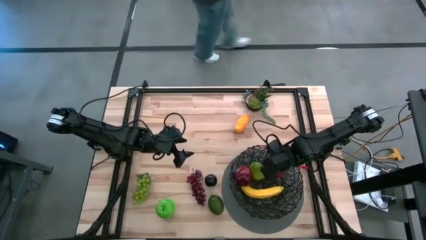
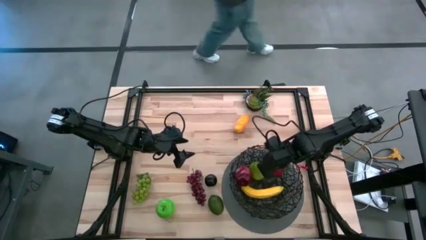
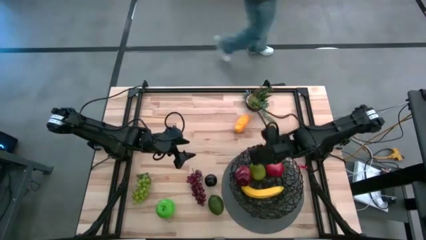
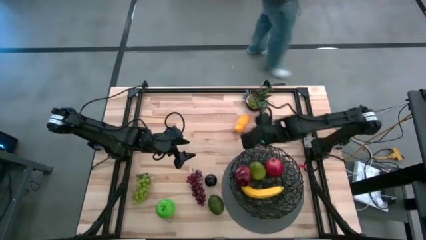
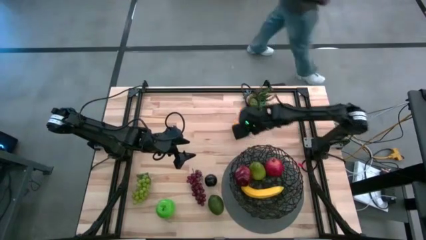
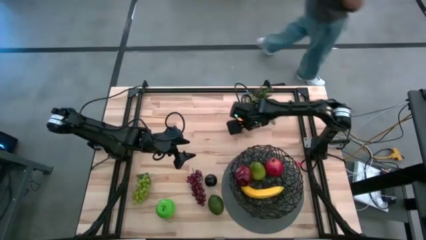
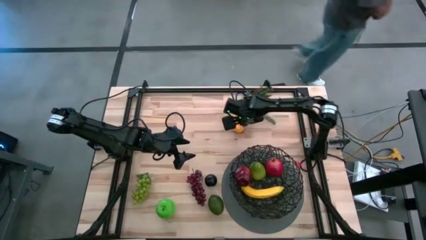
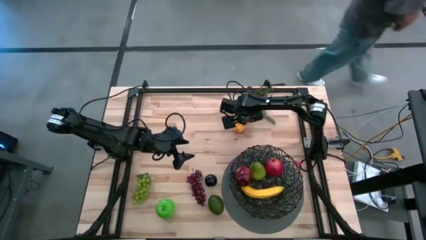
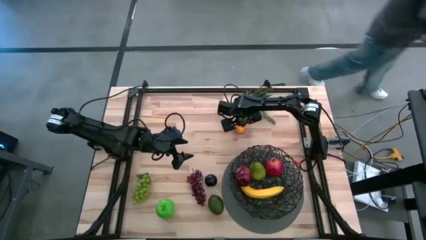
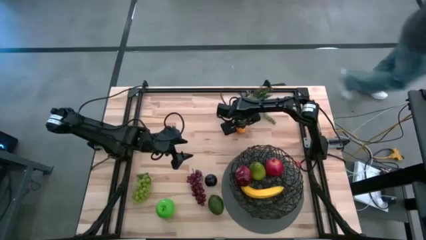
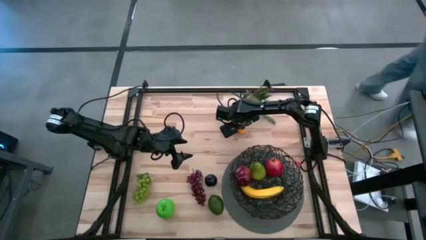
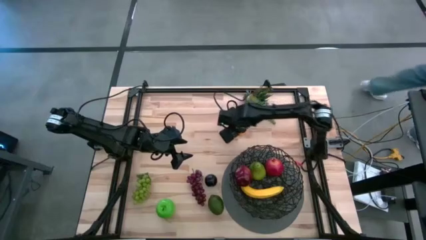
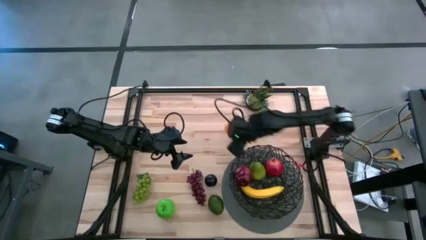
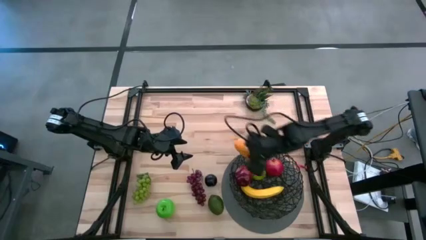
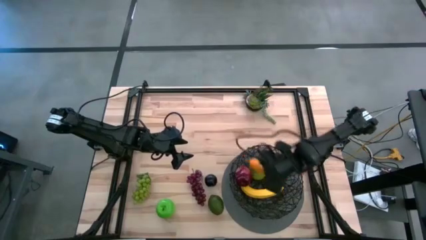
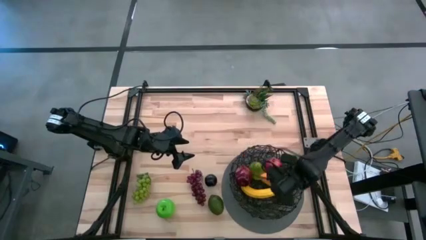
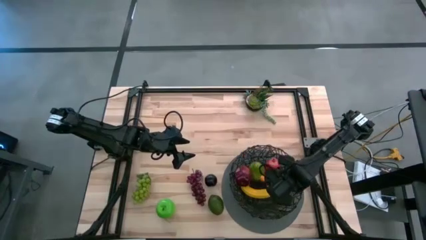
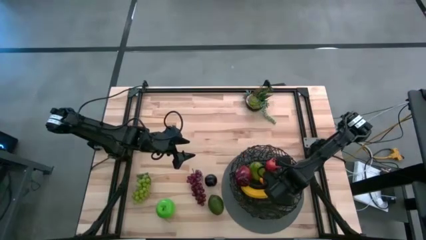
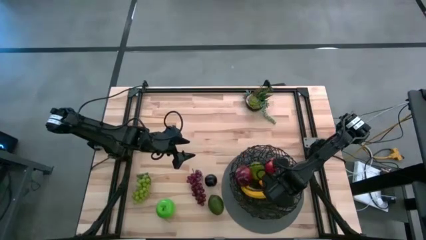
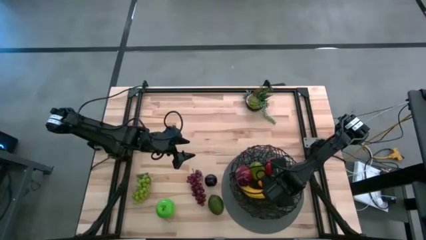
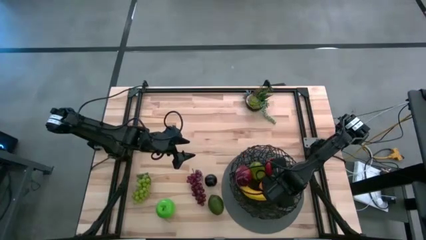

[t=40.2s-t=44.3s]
Task: Build produce basket
Put the mango into the black wire basket

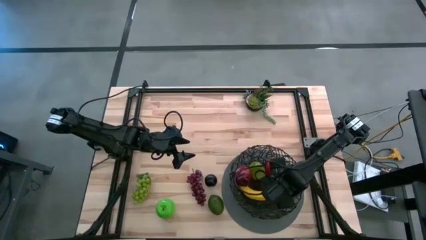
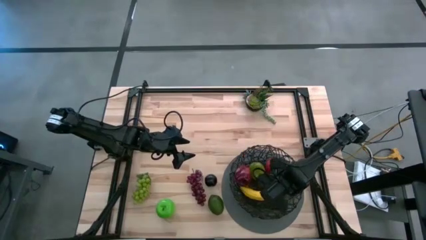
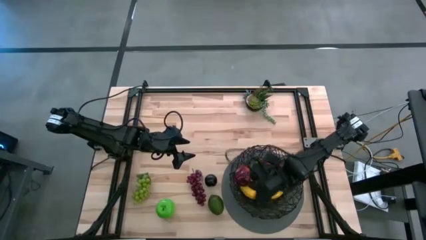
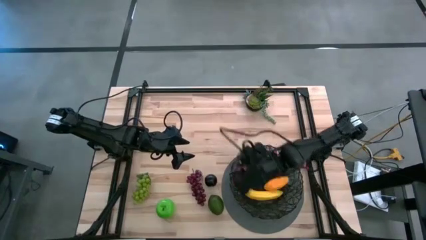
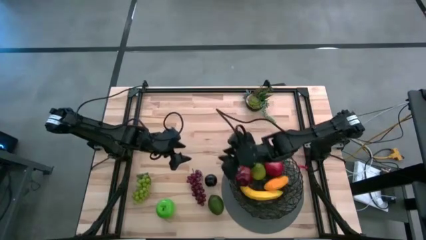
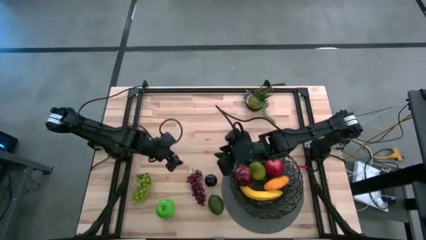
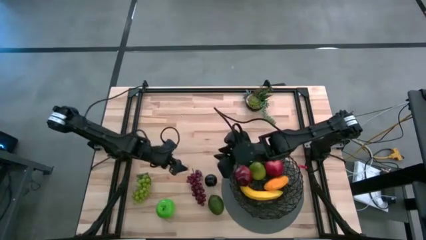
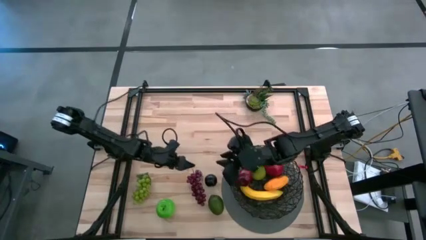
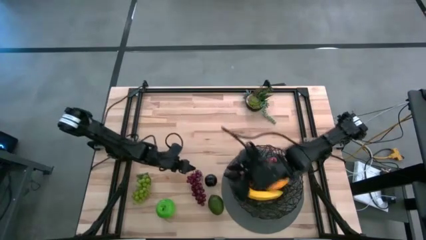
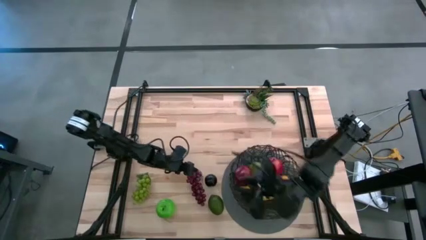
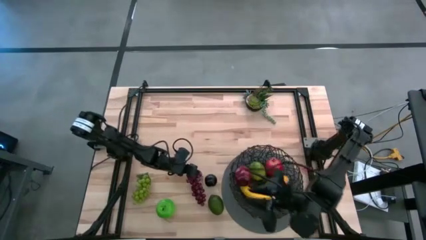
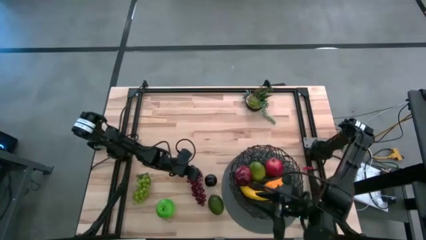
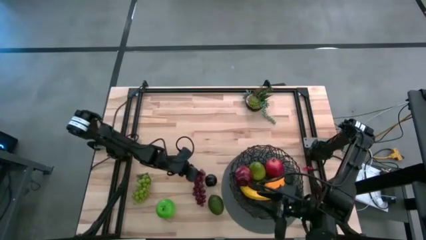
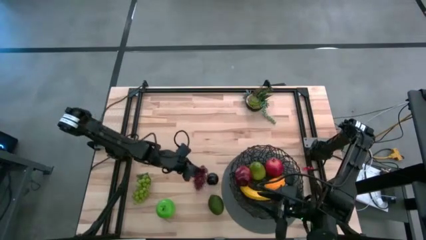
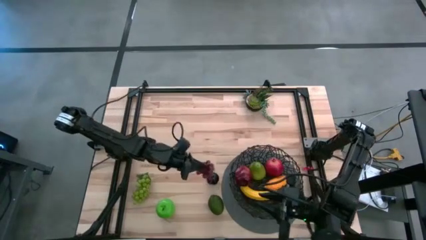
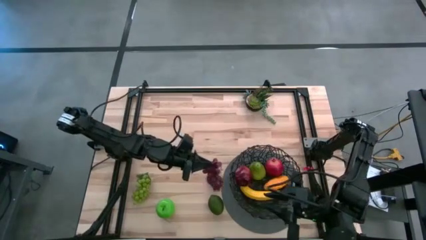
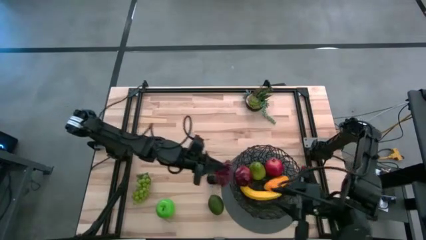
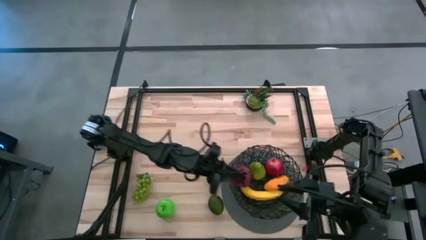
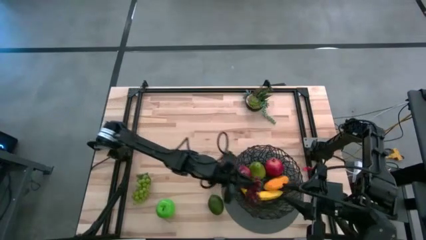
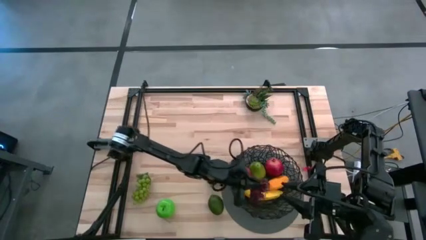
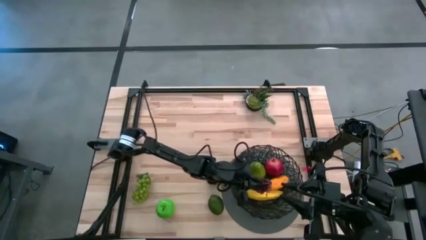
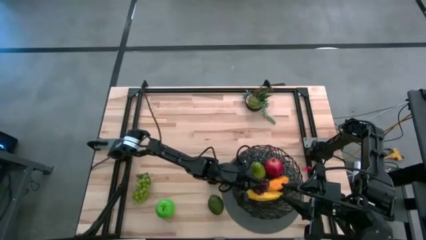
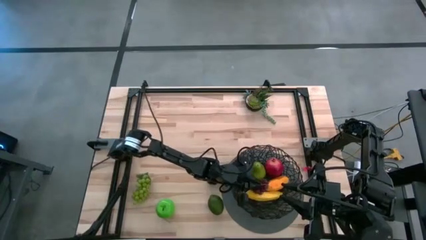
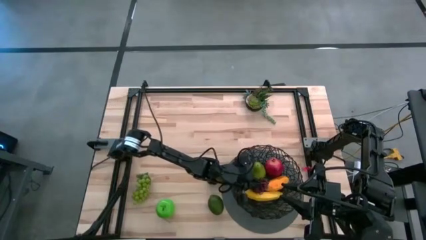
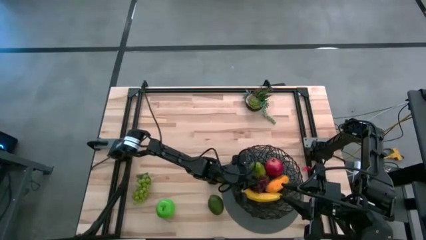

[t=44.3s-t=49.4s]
Put the purple grapes into the black wire basket

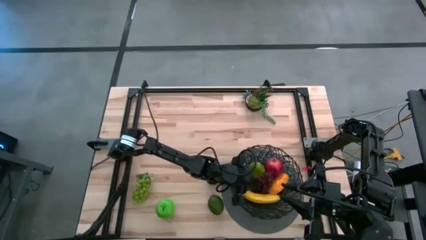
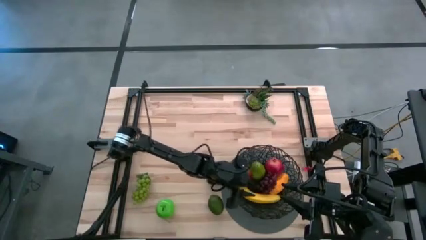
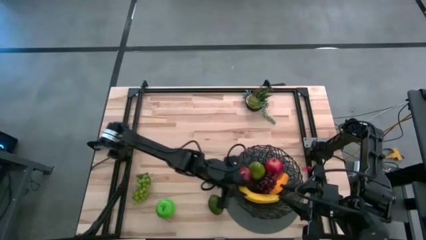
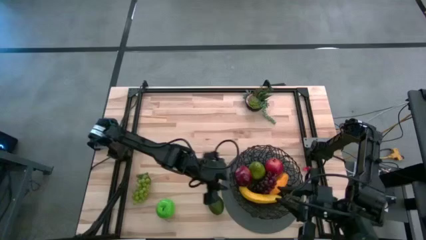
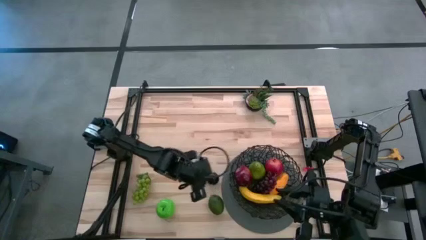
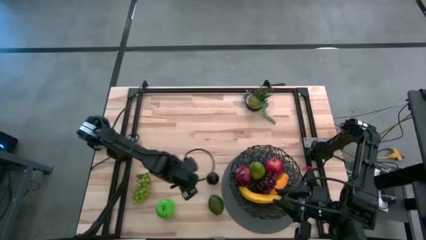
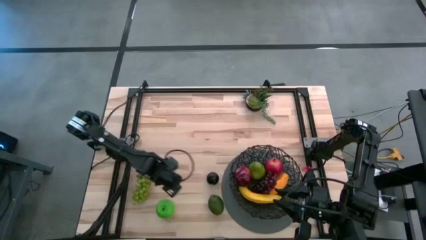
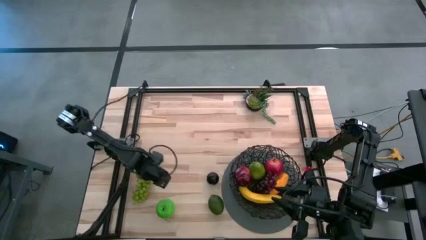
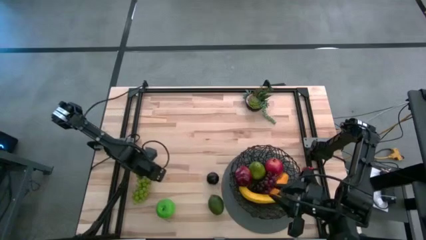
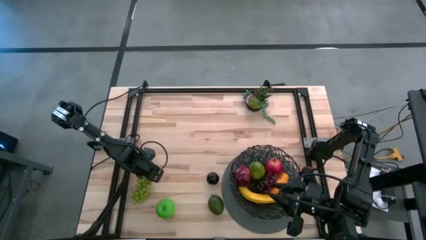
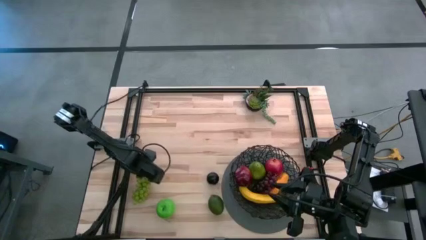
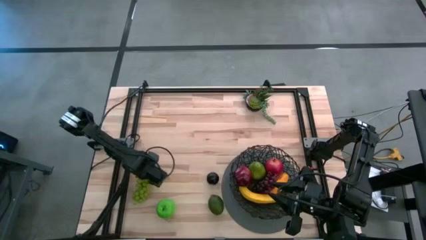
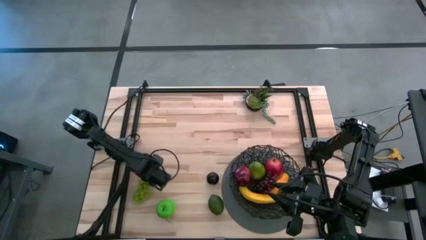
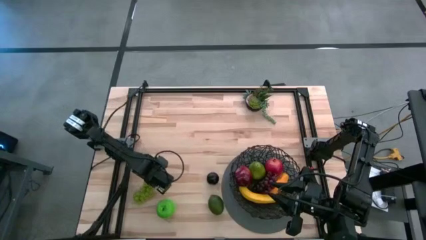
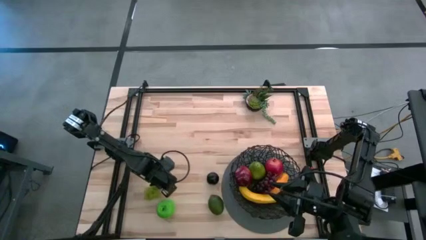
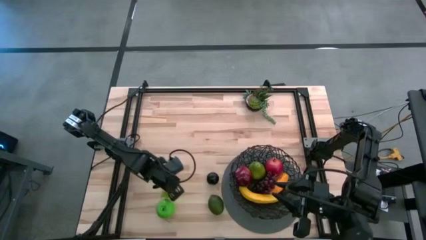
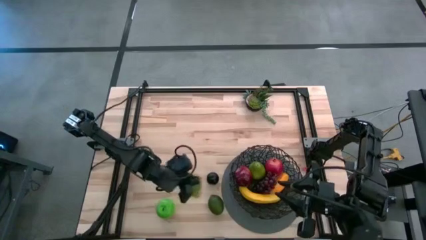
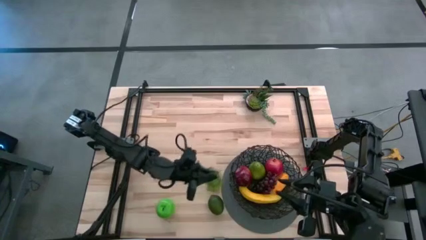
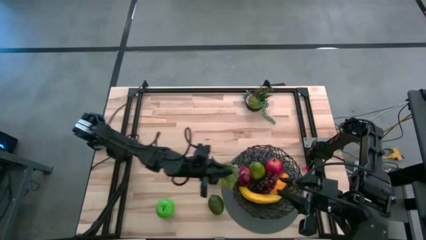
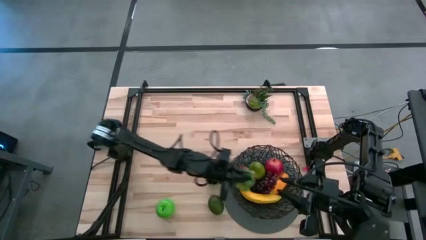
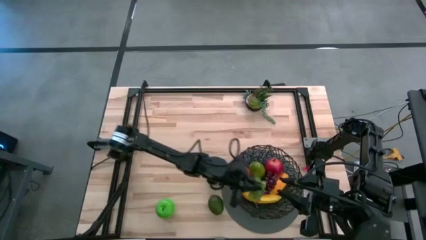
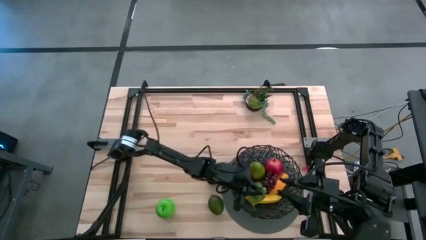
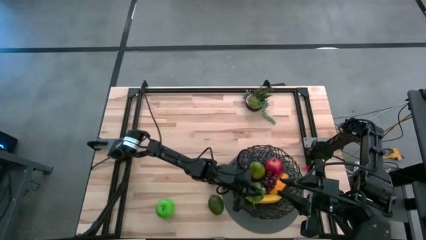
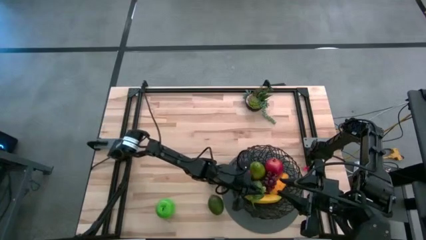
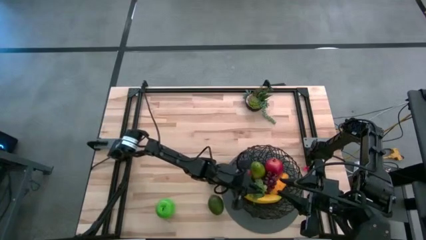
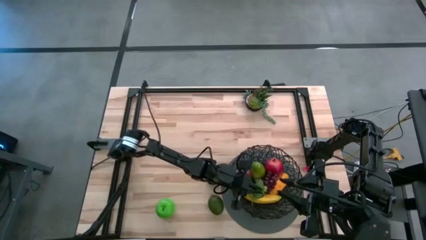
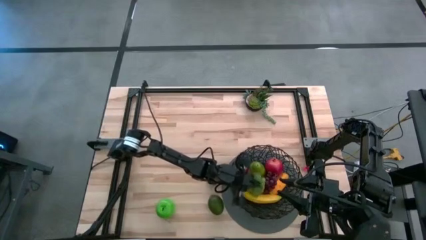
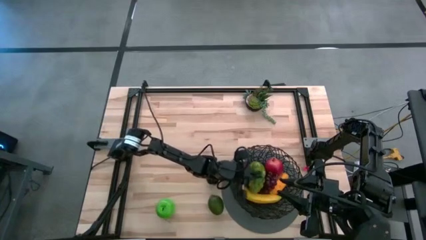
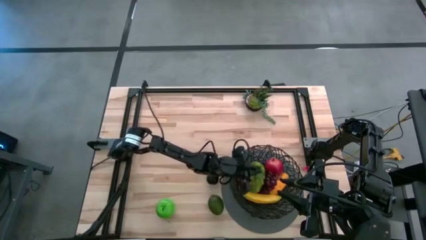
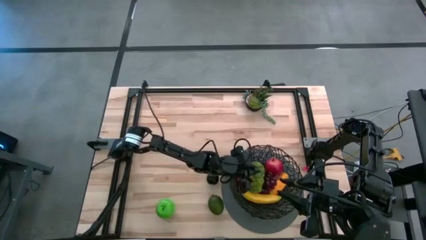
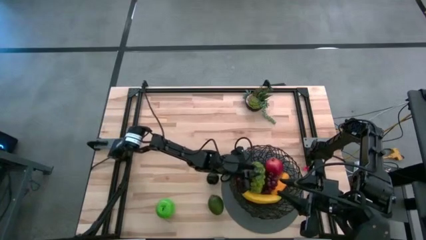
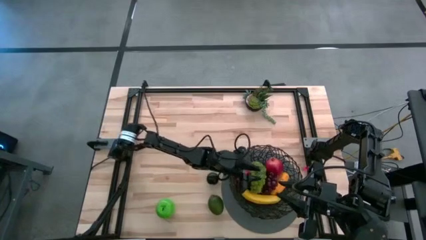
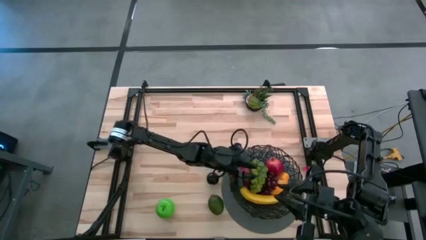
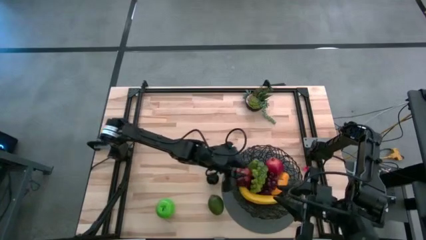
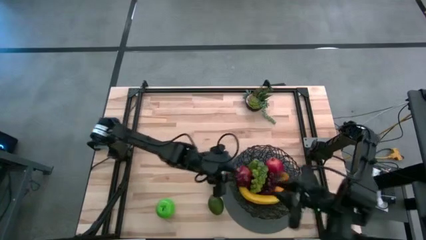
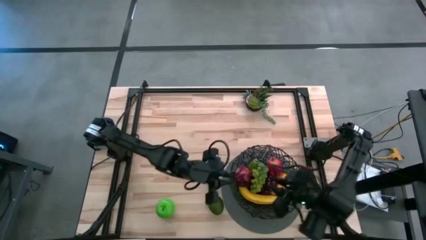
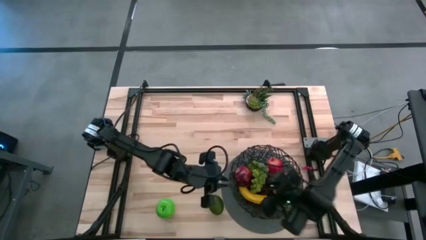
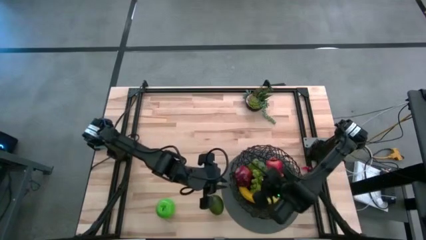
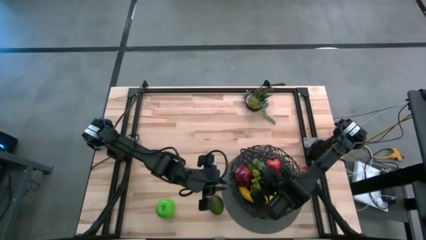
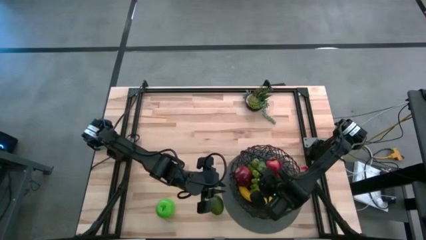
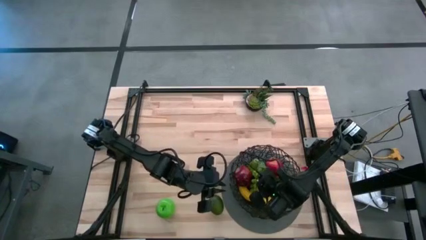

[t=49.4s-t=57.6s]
Put the green grapes into the black wire basket
